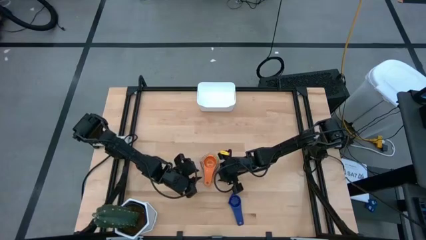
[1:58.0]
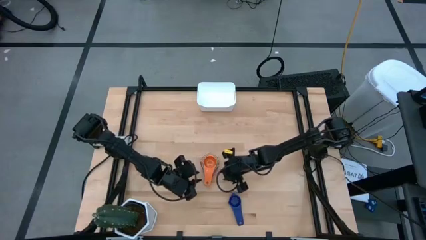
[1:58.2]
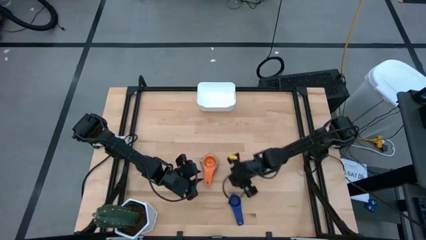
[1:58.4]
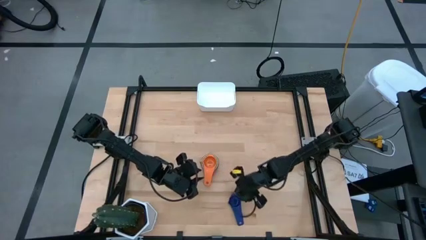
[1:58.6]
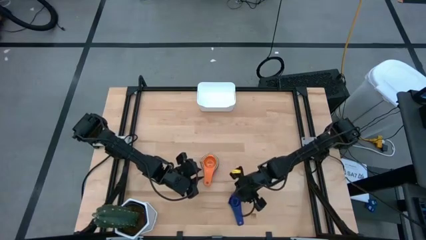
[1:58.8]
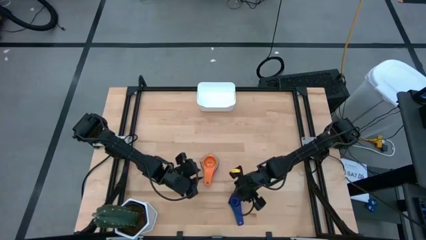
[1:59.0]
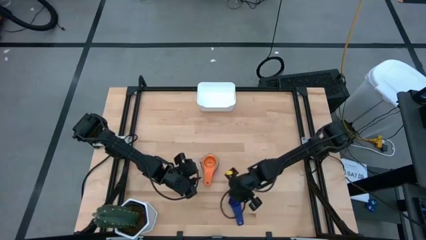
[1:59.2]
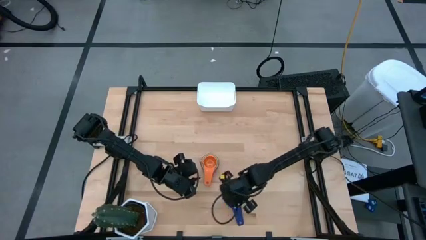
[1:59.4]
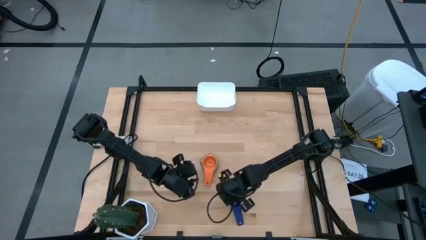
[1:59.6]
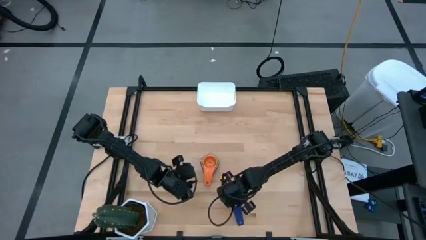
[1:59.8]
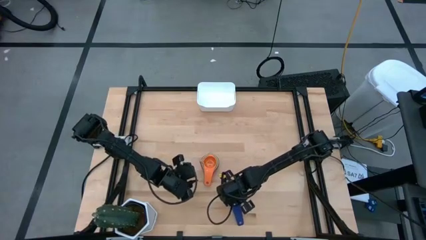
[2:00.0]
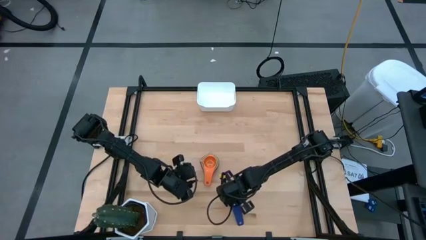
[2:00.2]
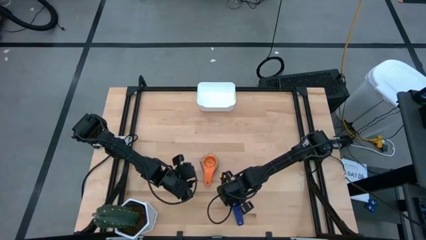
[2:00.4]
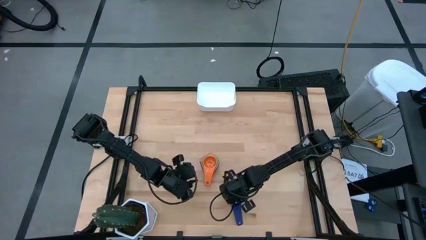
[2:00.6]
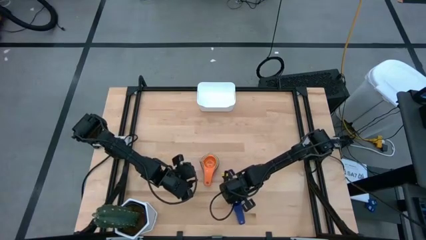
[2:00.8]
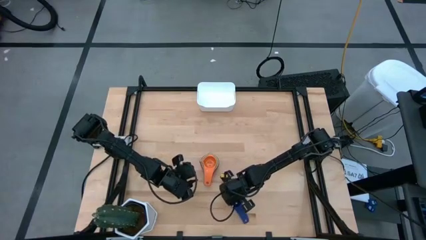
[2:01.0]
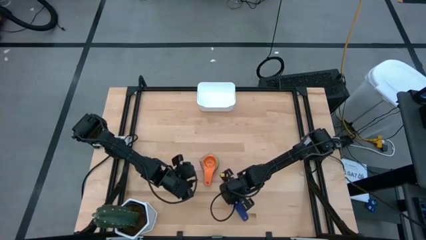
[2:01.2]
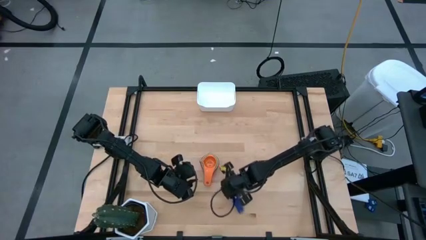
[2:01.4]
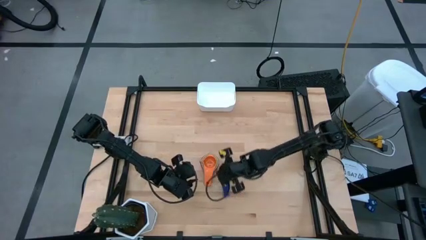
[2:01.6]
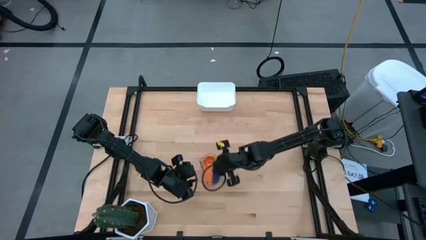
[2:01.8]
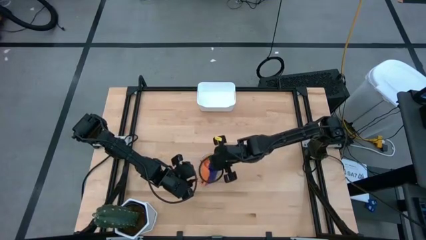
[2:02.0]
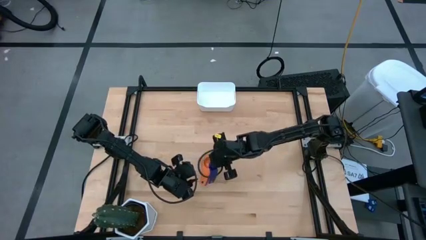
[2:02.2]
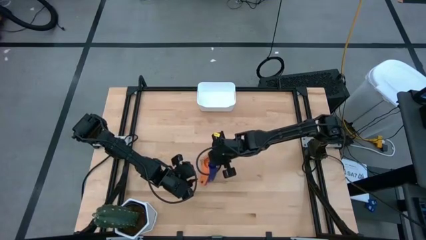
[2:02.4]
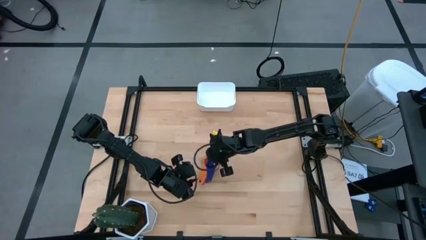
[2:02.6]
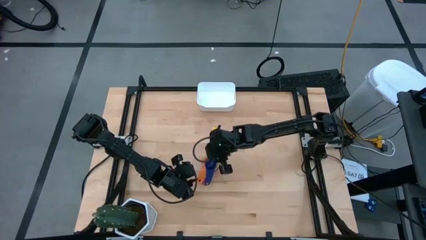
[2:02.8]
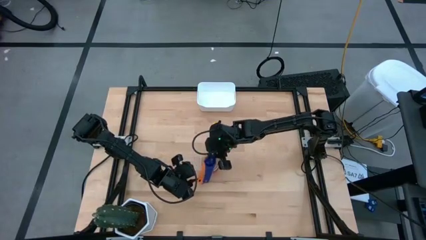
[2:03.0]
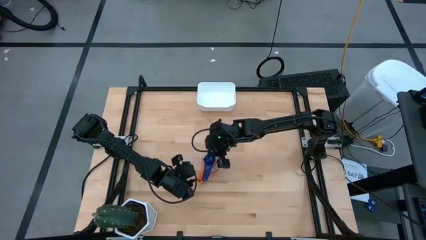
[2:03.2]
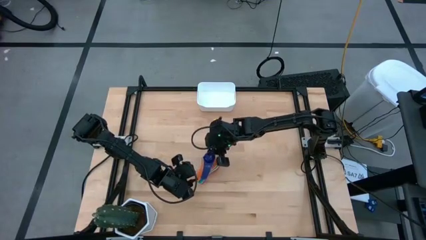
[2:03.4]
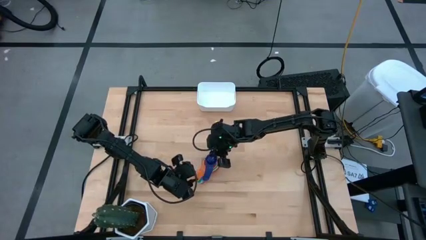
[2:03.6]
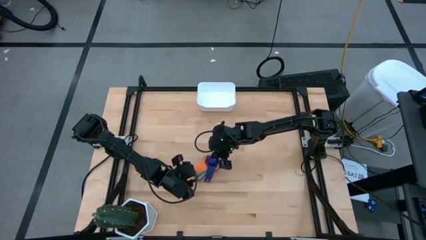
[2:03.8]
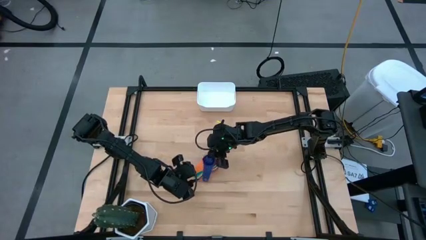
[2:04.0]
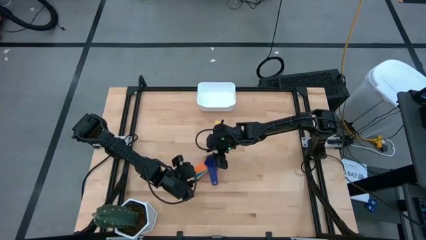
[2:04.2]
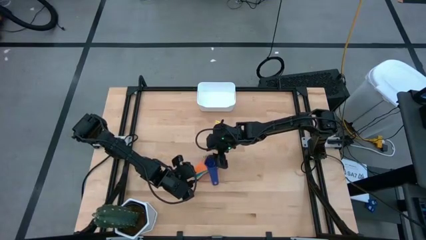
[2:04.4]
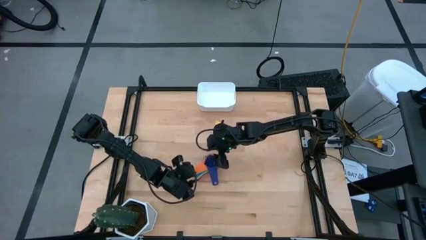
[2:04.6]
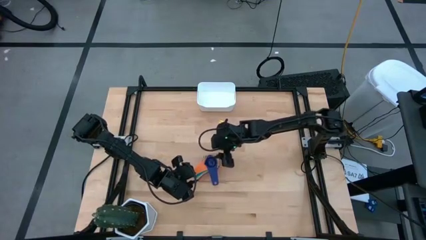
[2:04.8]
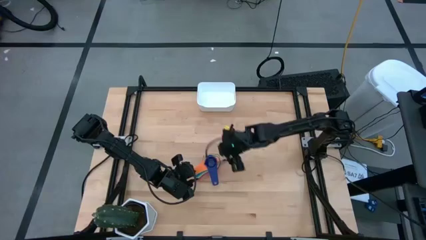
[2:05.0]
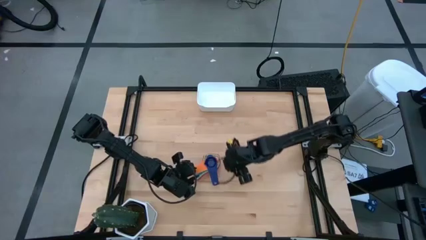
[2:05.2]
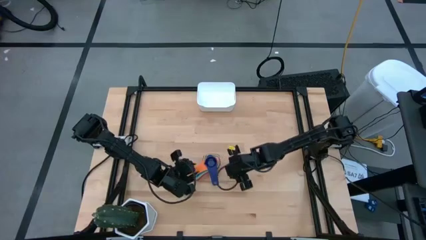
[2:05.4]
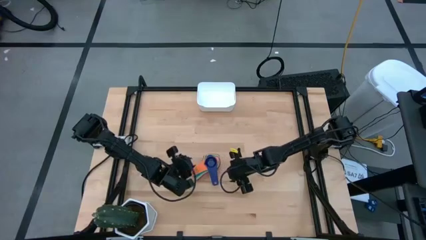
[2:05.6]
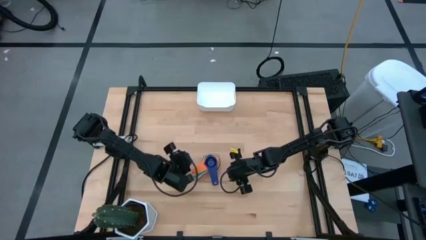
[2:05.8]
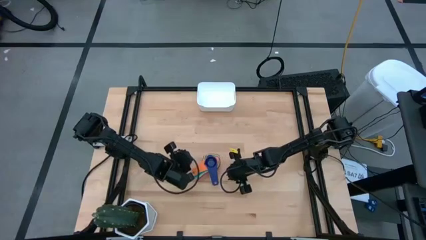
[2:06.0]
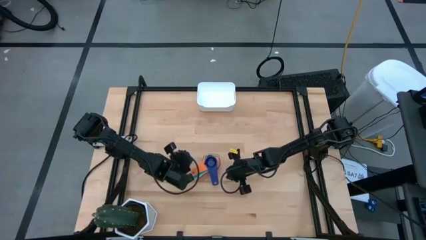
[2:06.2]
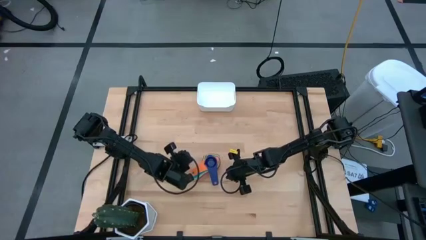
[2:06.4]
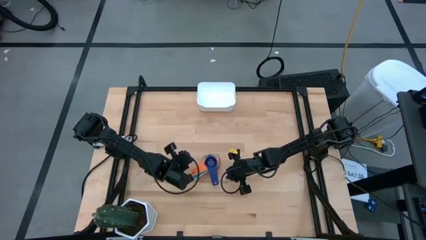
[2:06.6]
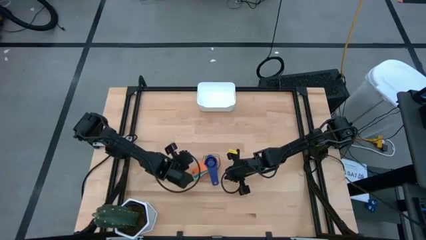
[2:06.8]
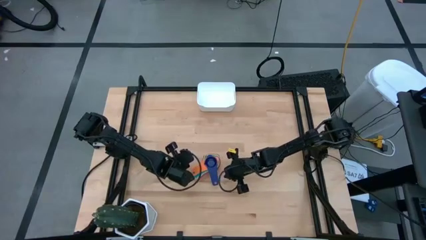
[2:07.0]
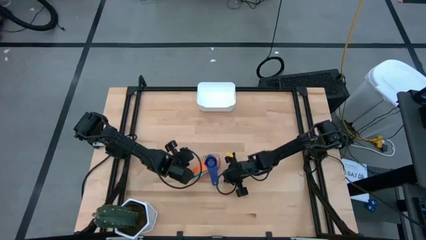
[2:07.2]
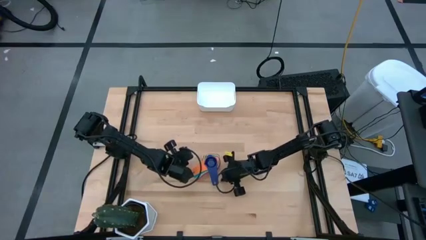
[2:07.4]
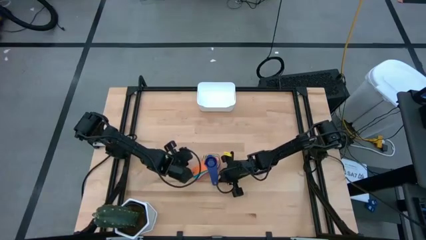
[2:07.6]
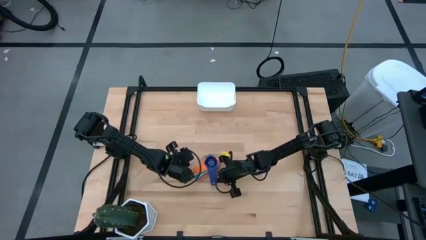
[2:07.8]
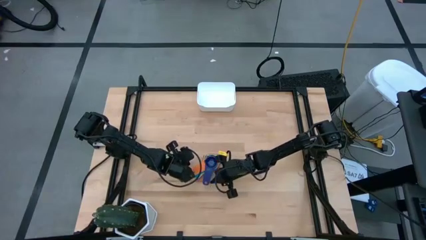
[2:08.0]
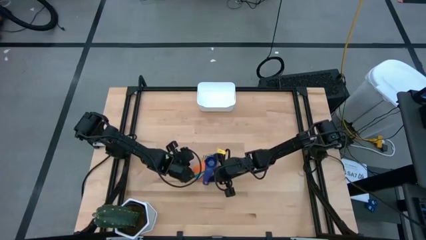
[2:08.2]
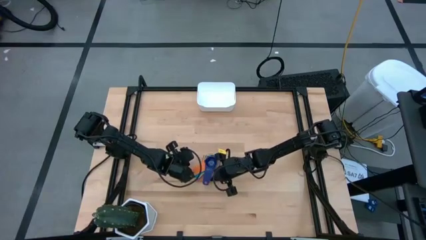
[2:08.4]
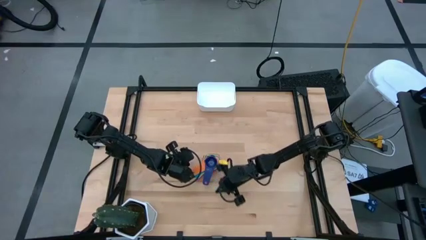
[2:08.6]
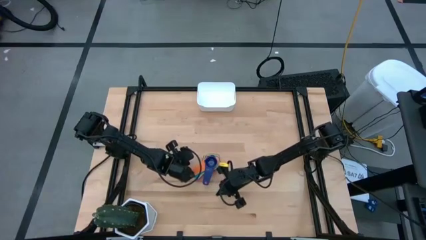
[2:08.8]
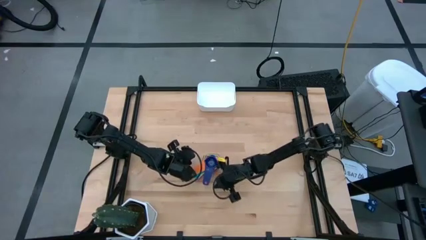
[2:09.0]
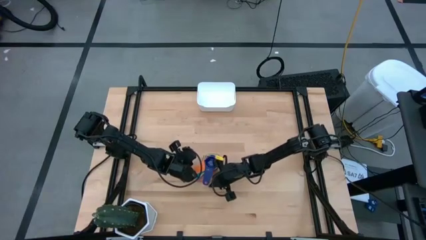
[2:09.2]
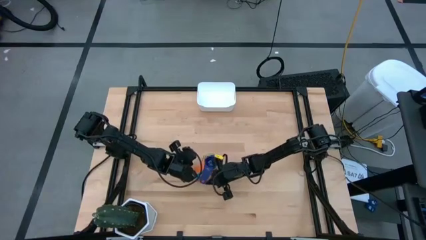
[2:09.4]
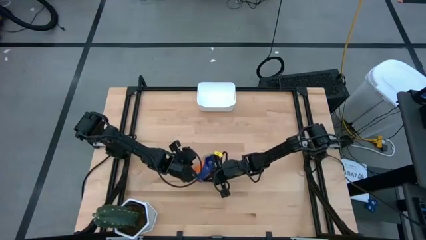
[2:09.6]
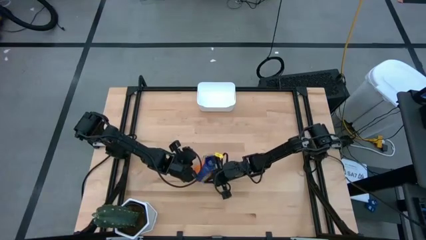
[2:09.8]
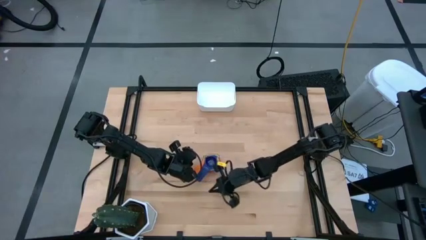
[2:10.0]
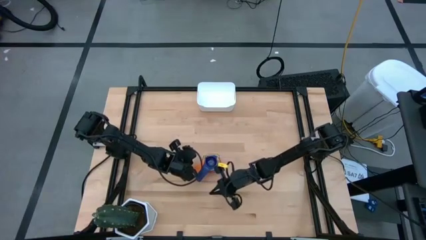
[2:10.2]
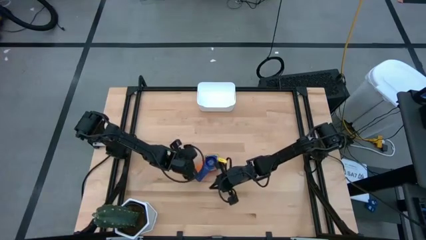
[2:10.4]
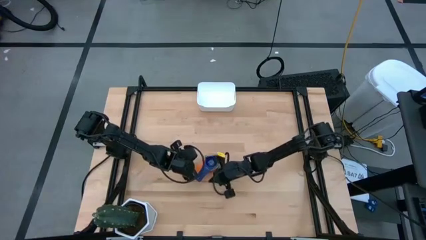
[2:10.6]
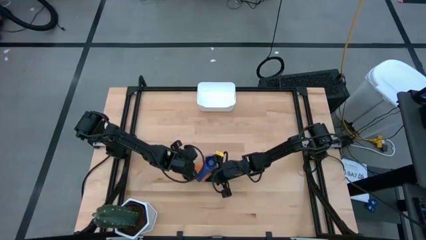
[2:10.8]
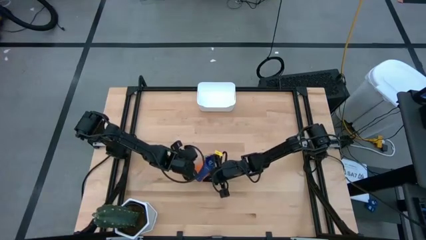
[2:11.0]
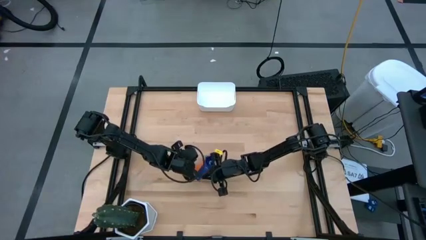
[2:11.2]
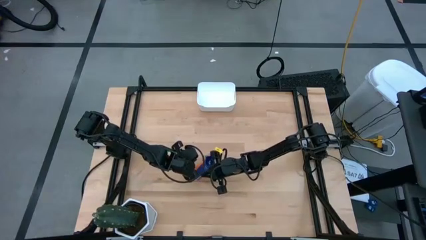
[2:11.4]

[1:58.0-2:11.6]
Task: Nest measuring cups in basket
Stack the dark blue measuring cup on top of the orange measuring cup
